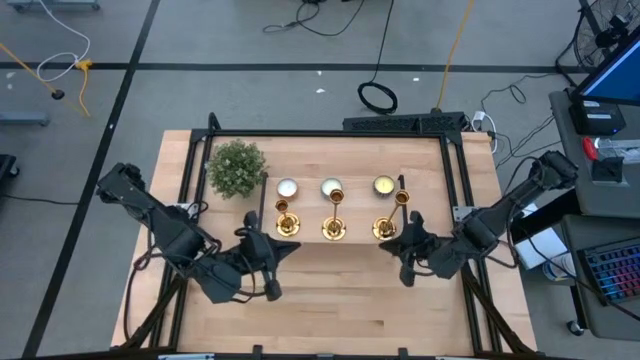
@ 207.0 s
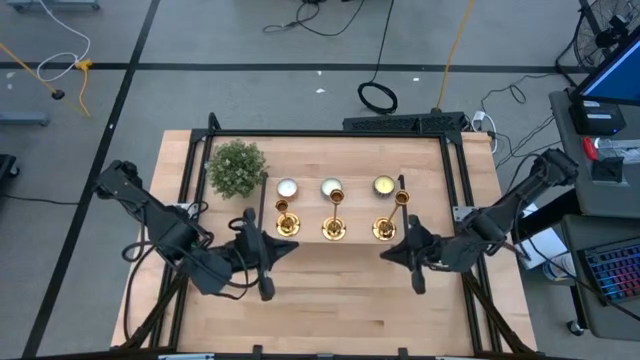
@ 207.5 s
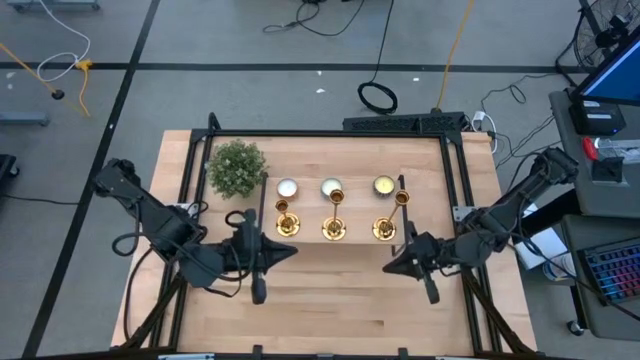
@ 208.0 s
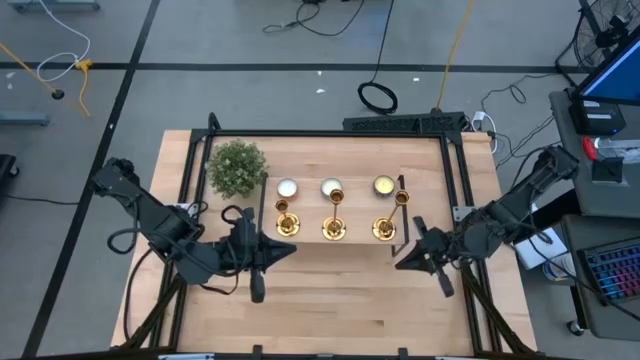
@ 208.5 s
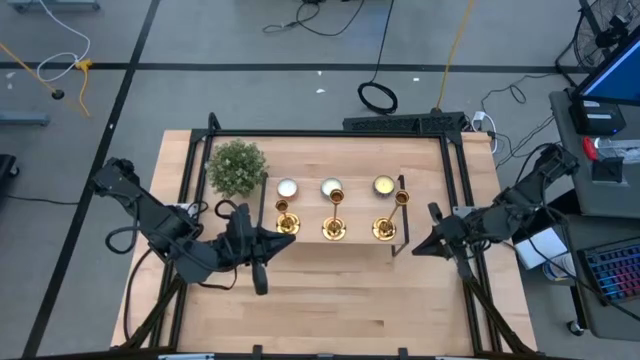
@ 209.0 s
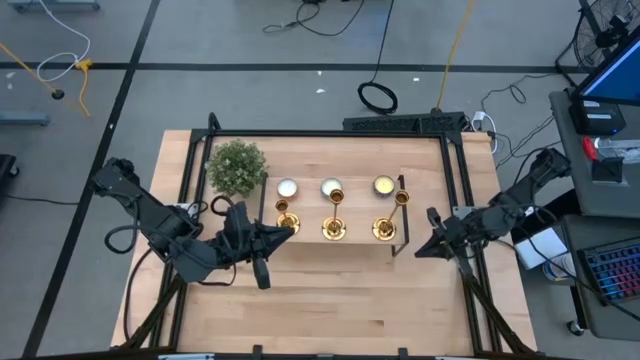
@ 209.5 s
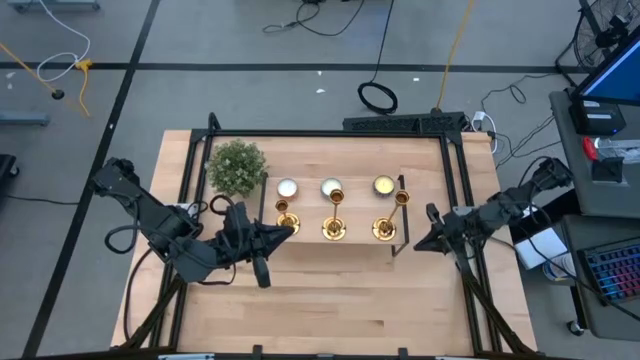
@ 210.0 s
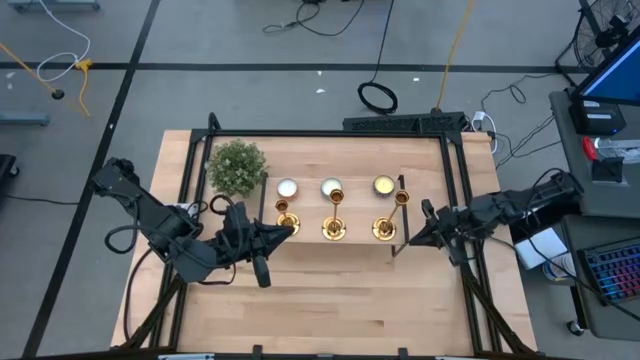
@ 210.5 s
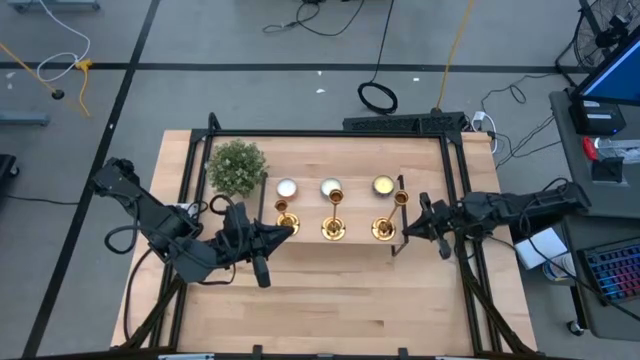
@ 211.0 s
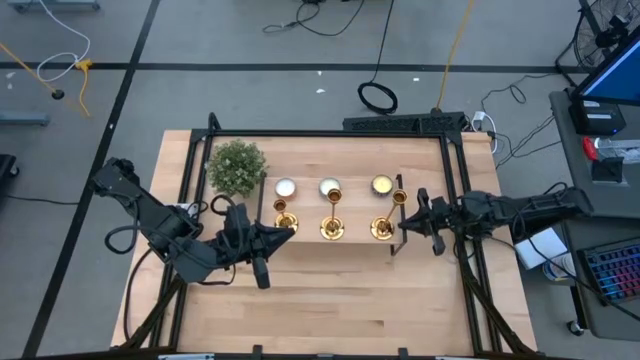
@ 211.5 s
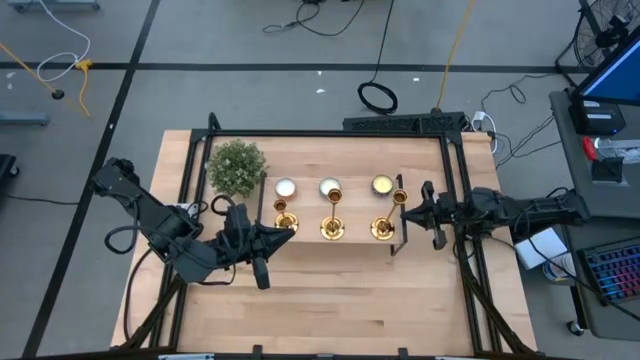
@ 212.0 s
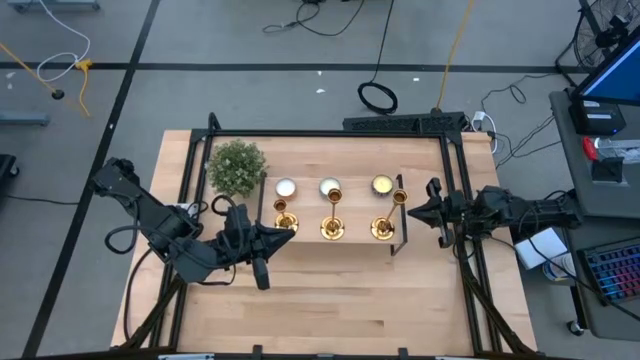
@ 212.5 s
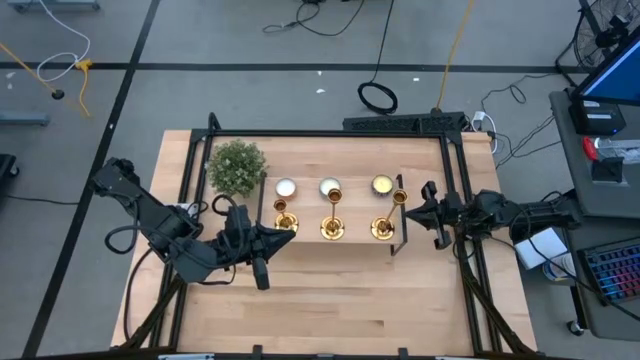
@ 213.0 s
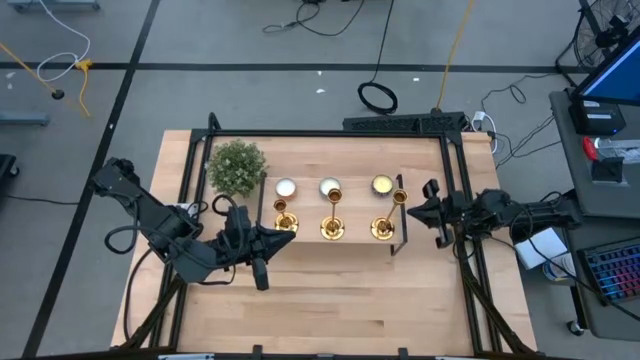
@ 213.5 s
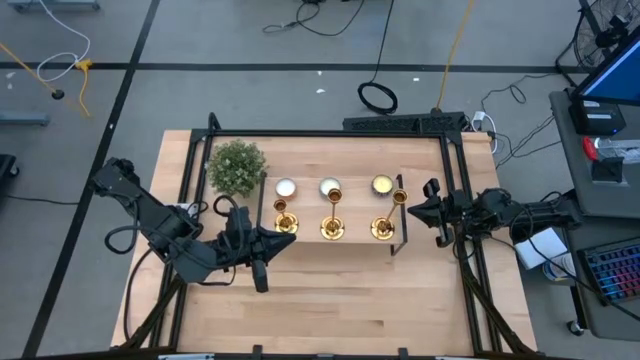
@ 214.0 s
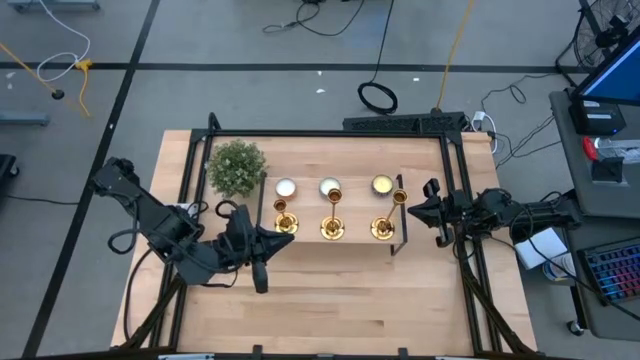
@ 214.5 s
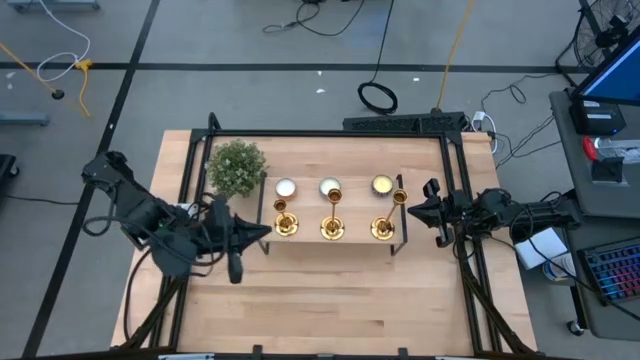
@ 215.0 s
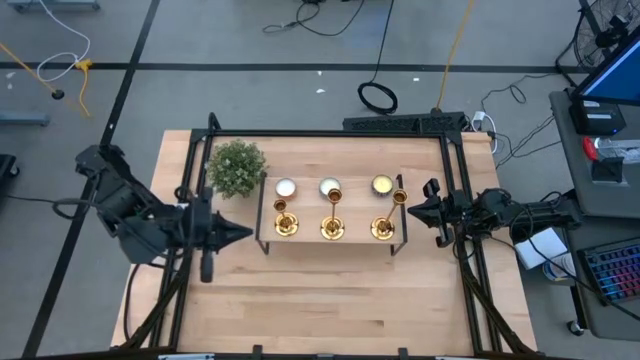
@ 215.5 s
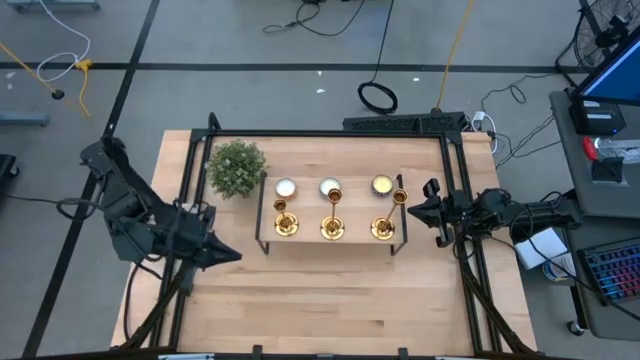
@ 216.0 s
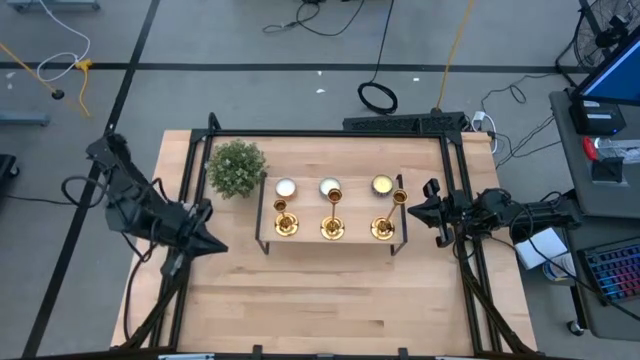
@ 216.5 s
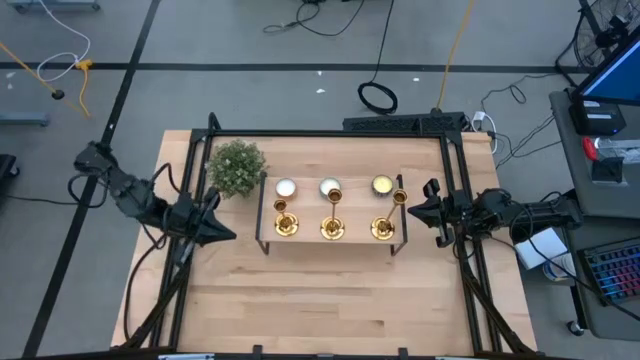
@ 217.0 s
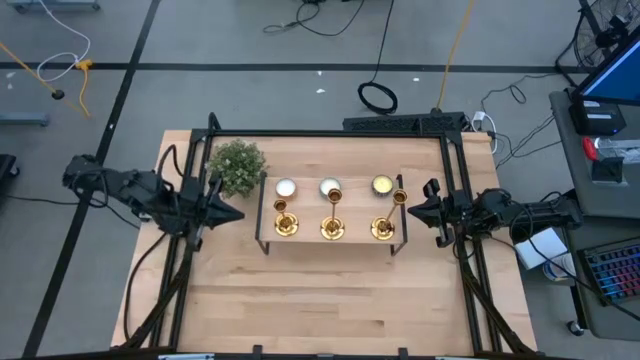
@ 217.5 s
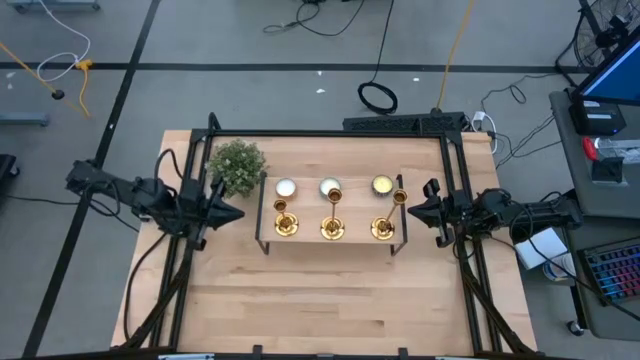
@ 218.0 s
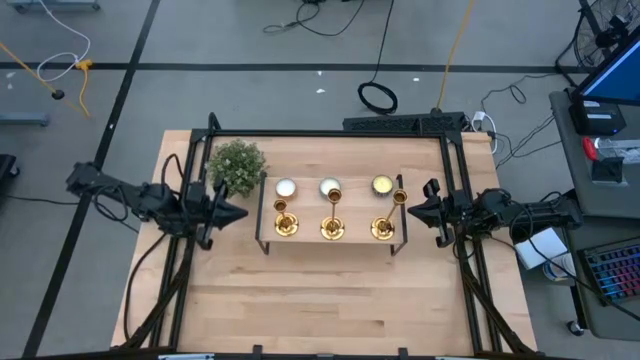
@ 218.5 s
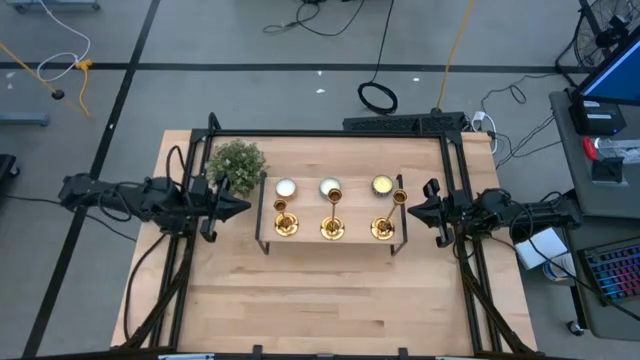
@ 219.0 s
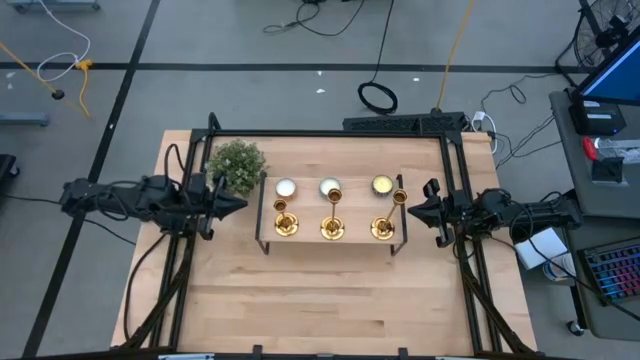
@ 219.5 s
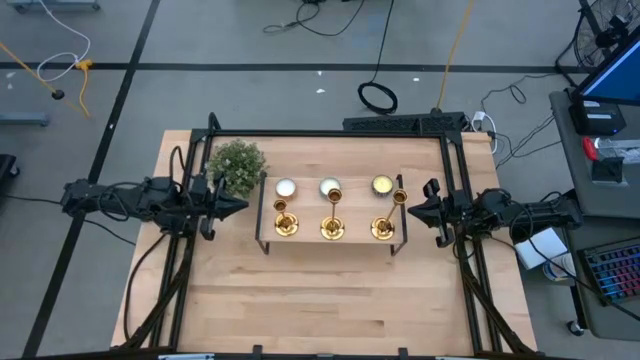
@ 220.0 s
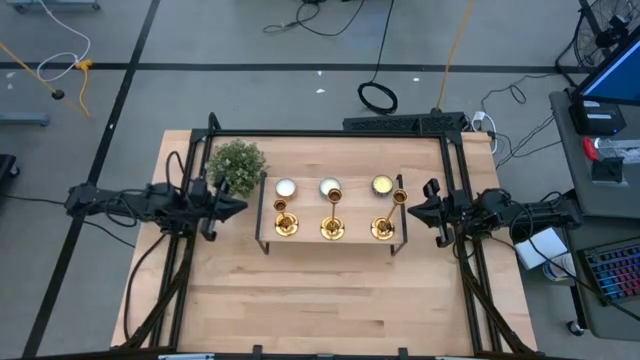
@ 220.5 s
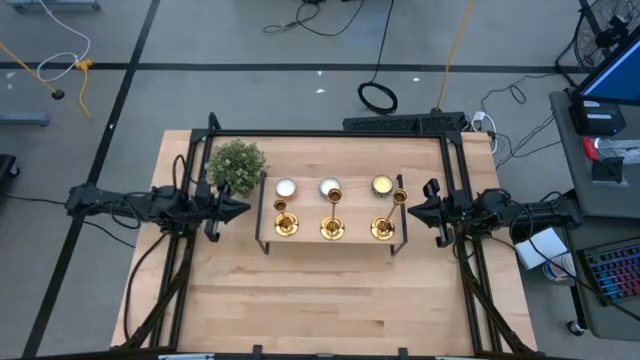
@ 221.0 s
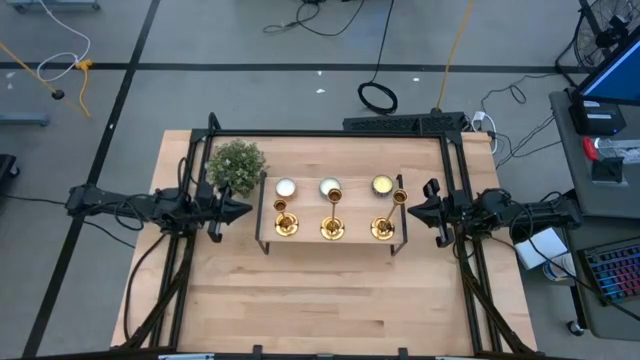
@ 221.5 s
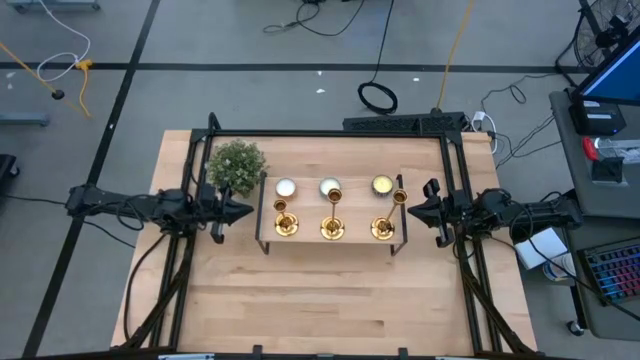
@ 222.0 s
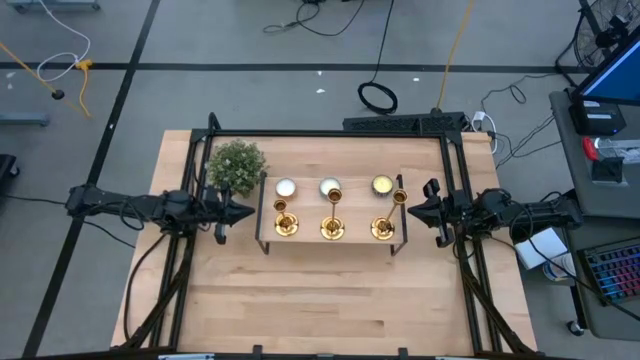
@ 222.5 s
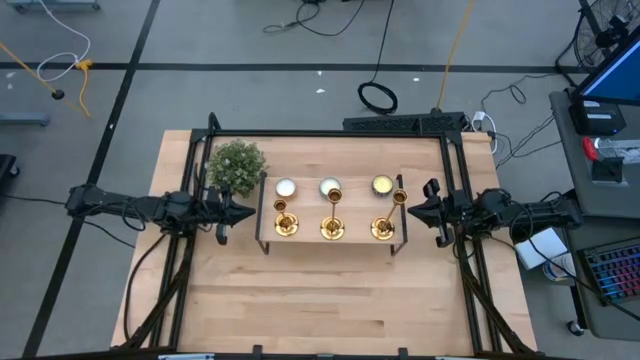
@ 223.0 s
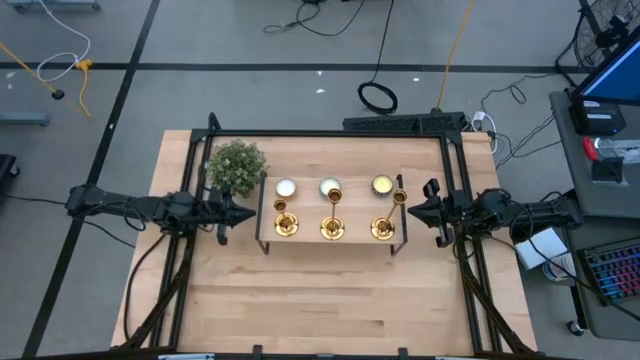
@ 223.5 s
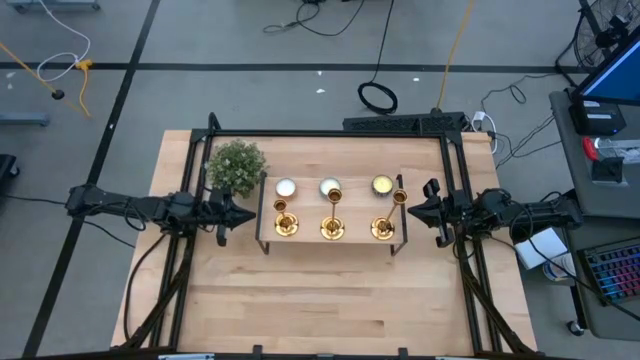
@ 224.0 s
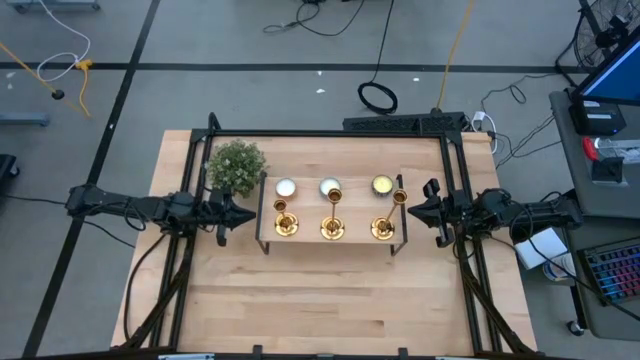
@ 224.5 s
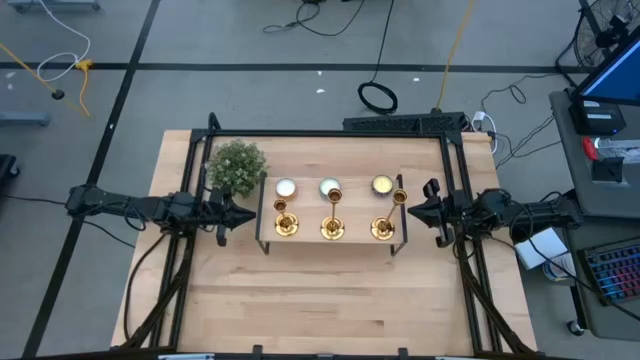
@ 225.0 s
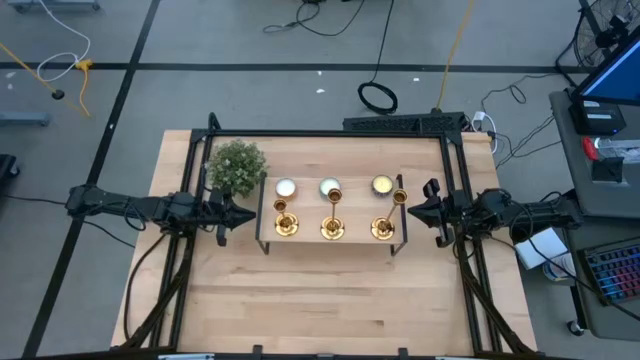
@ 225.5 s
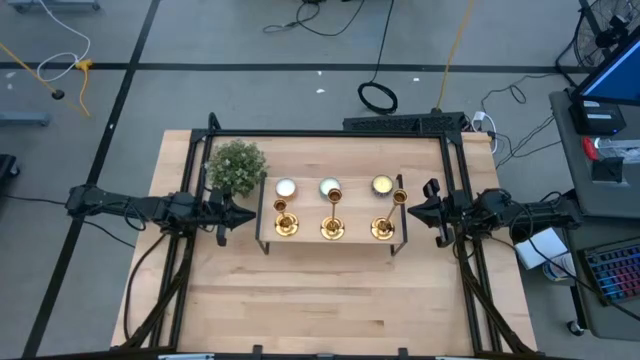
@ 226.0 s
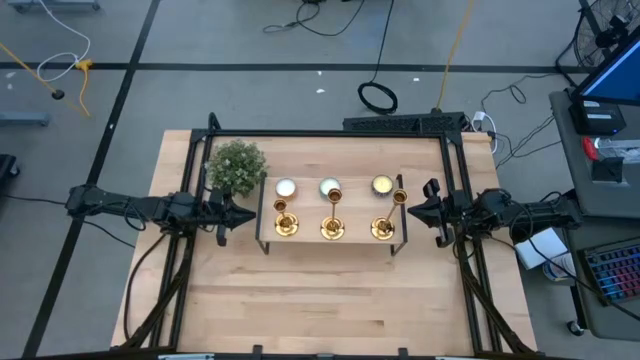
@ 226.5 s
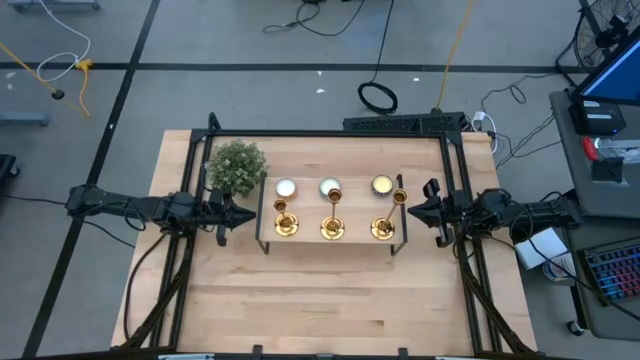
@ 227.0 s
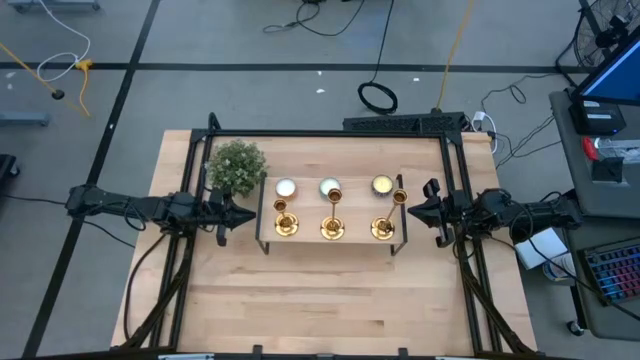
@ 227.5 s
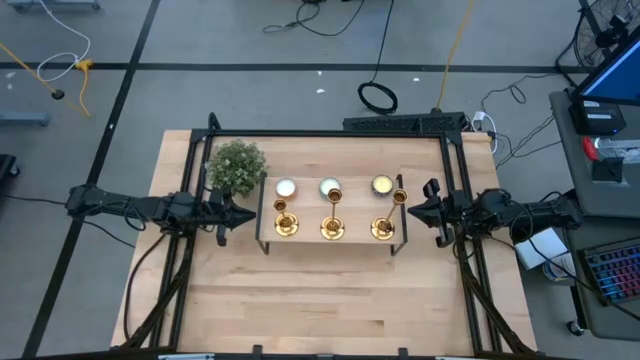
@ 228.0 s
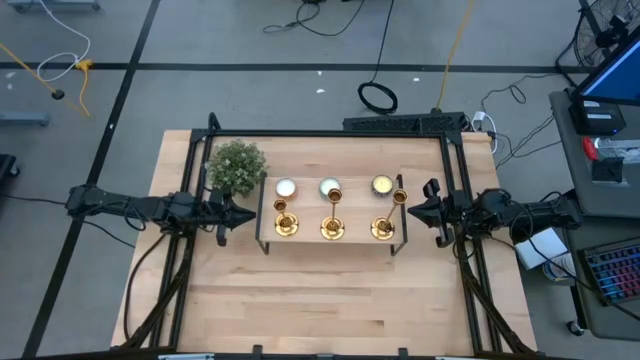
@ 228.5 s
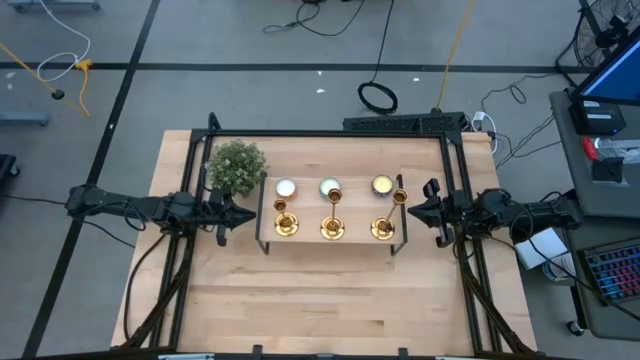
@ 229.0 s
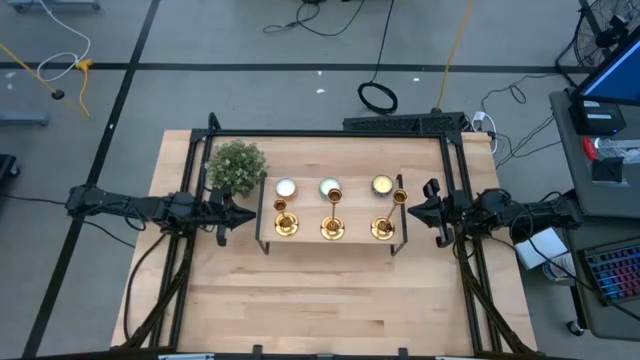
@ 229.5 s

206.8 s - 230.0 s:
Task: Pick & Place candle stick holders
Return to Home Position
